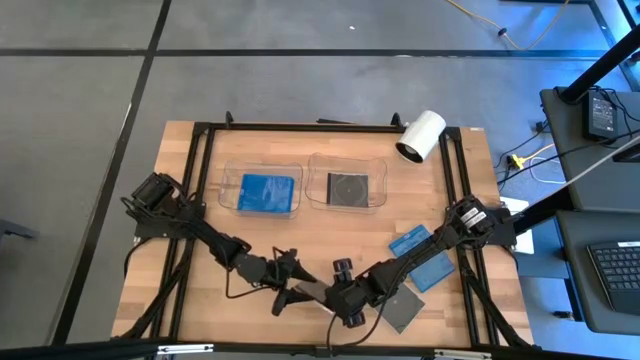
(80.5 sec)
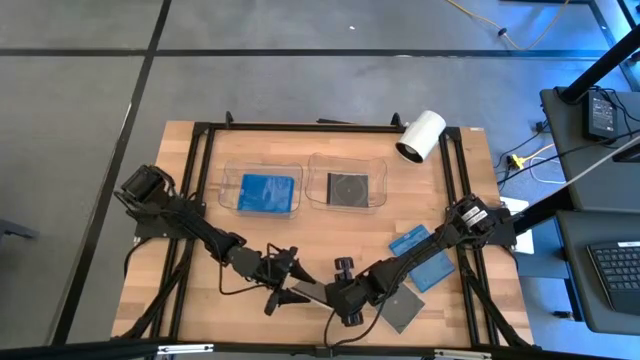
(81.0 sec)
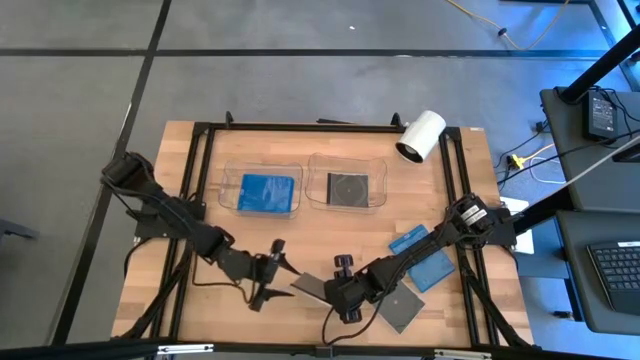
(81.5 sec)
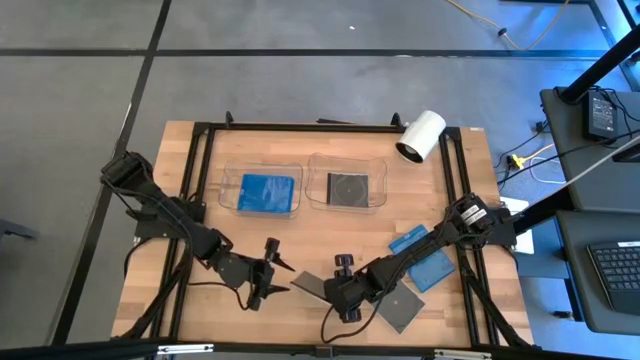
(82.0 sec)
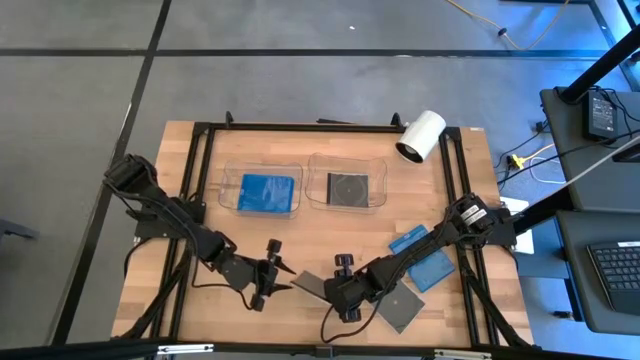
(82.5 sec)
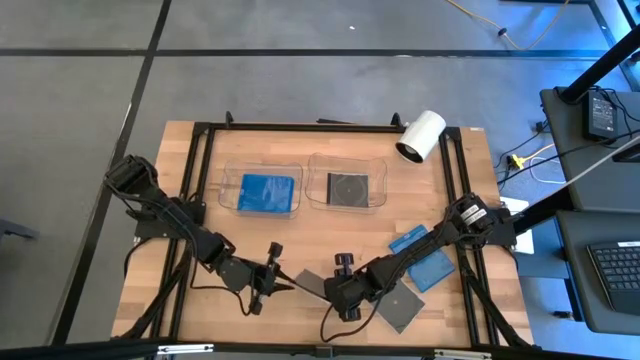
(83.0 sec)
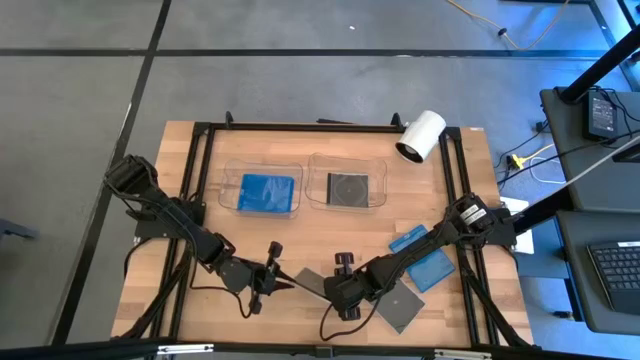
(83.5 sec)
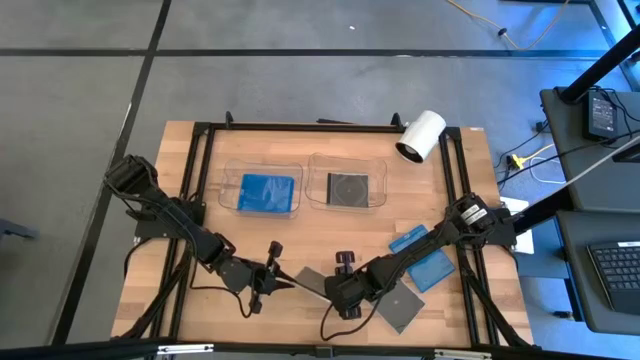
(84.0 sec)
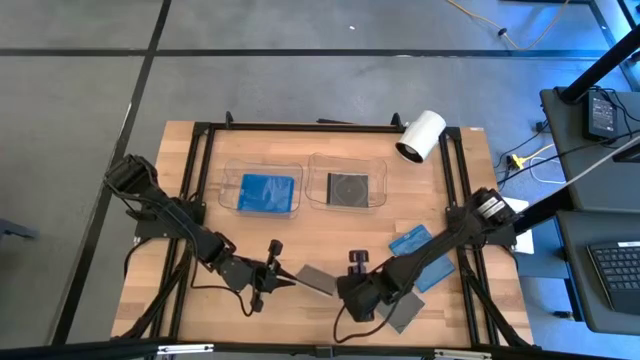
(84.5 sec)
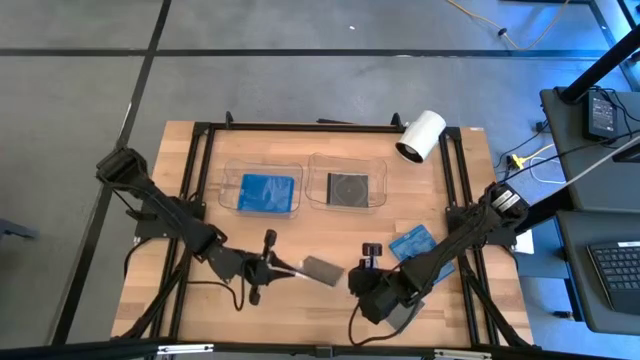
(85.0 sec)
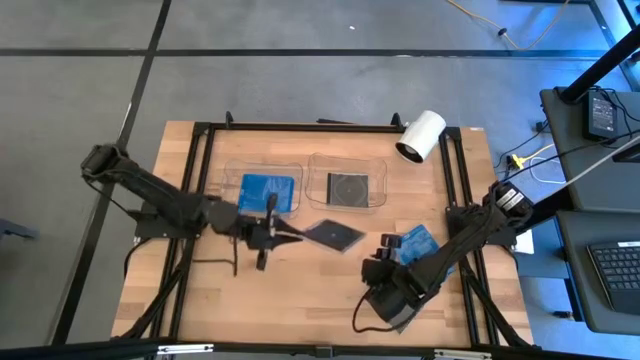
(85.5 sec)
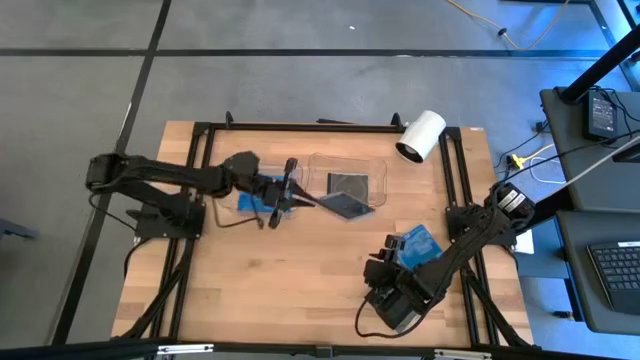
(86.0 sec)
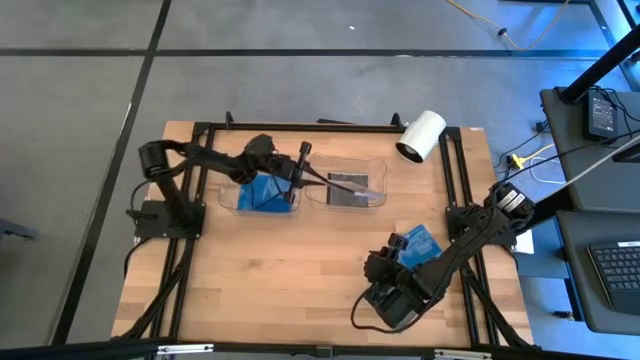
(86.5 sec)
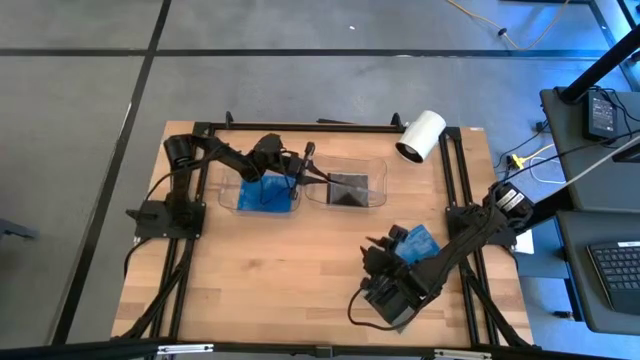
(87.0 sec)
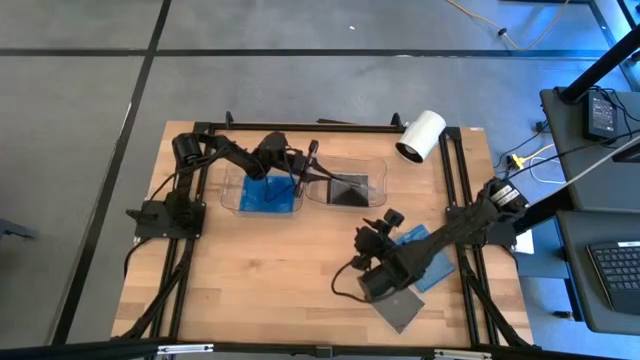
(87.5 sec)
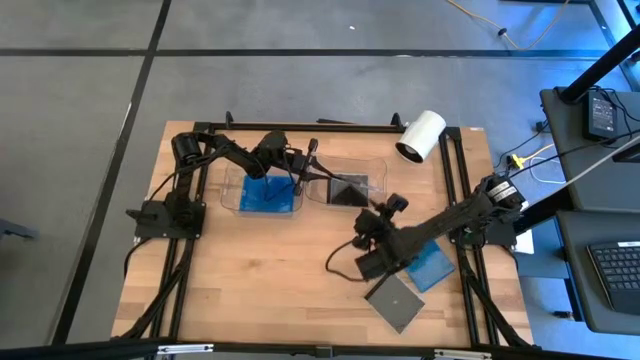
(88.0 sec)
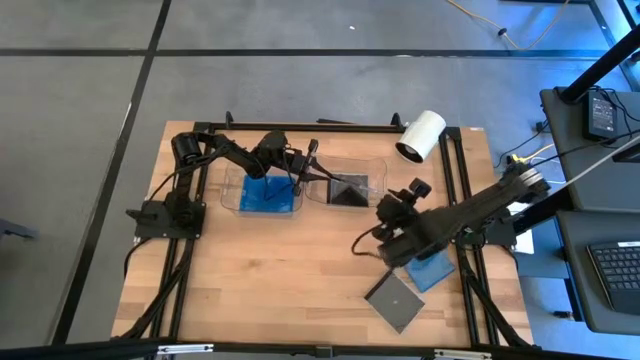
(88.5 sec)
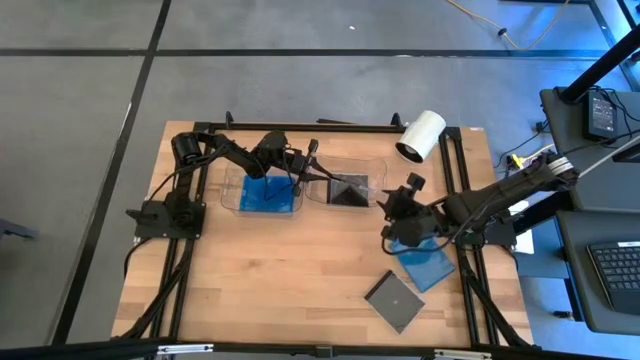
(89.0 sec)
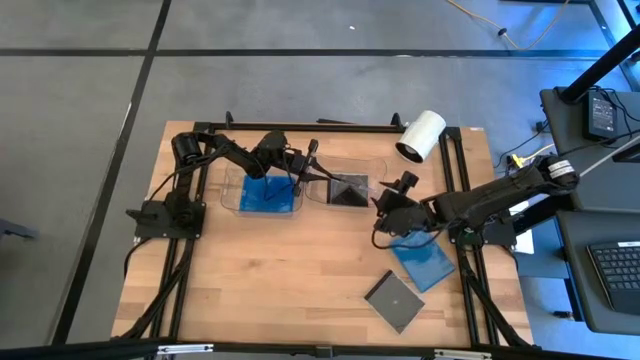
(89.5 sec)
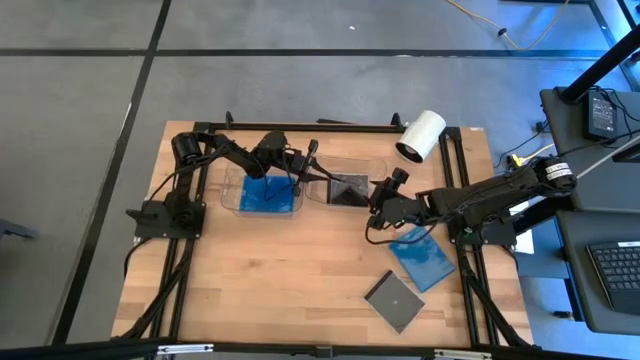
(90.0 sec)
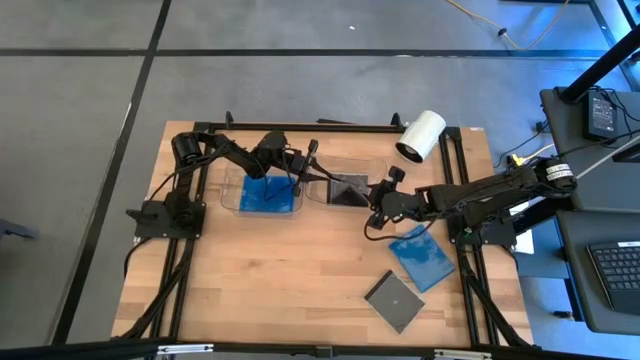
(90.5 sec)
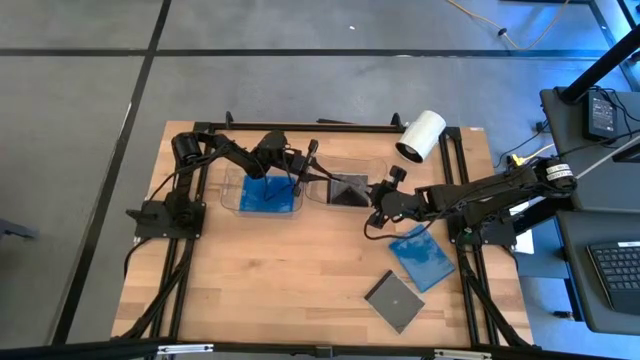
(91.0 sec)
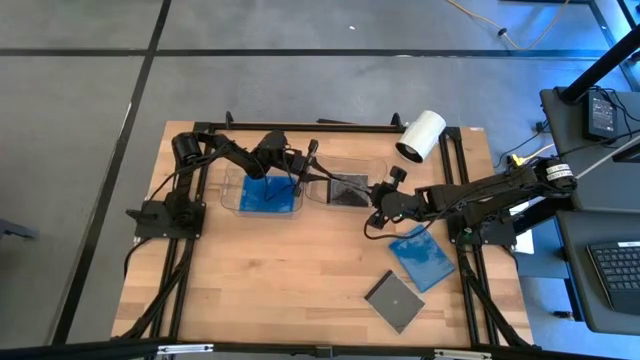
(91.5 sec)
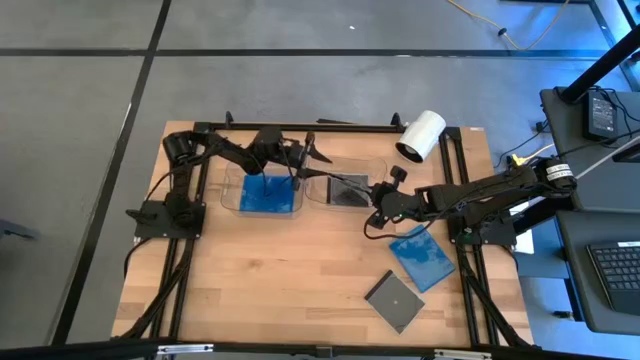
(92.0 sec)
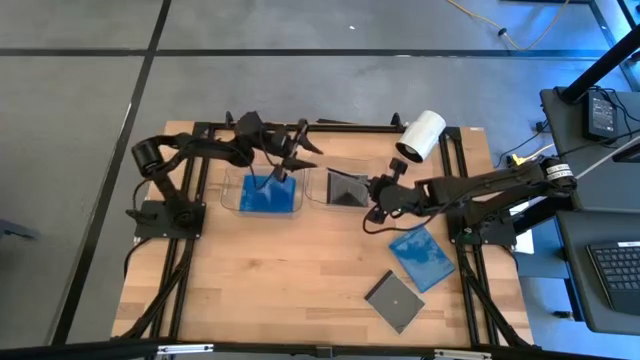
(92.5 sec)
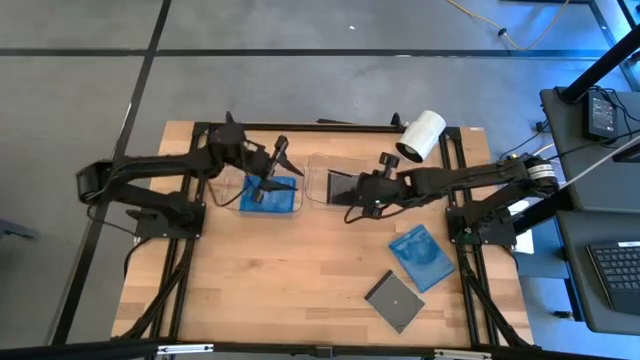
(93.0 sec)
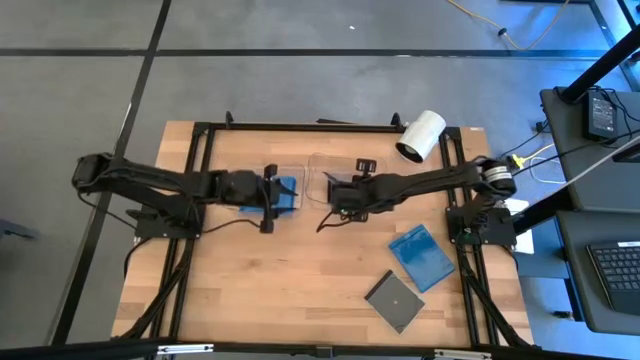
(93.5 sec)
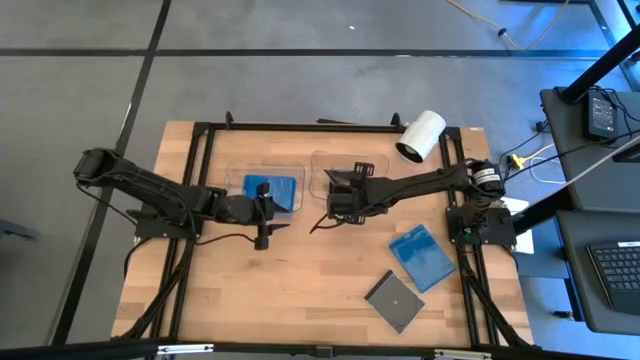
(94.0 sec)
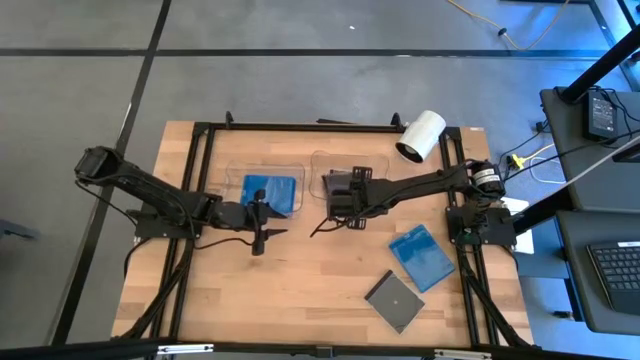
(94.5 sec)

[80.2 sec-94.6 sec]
Task: Pick & place jewel cases by type
Put the left black CD case into the right transparent bin

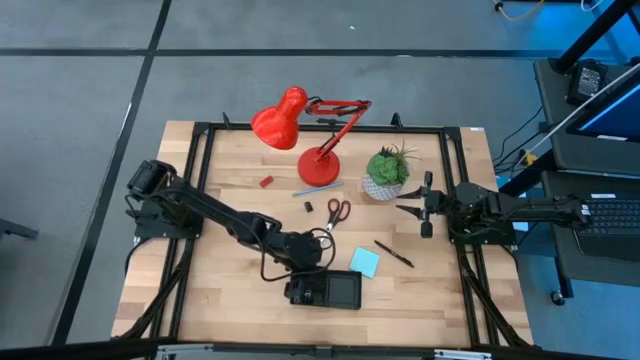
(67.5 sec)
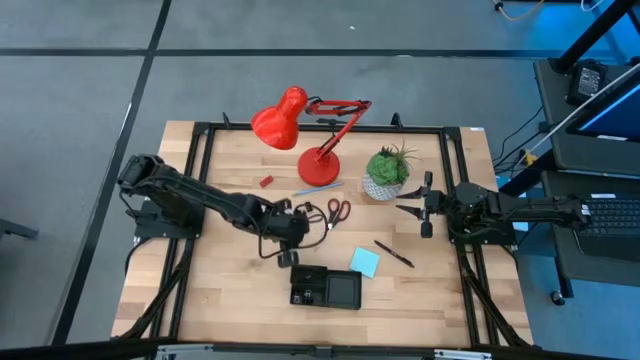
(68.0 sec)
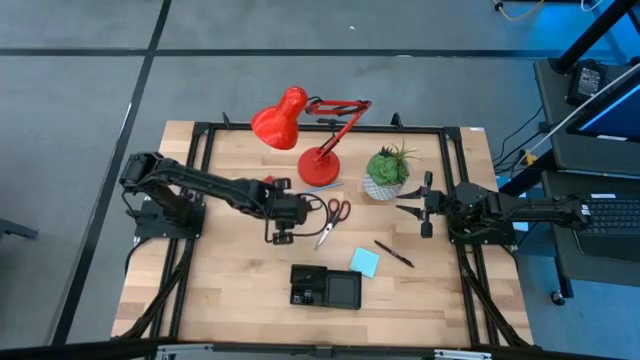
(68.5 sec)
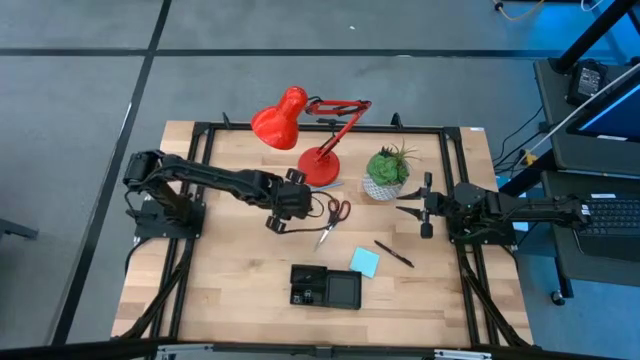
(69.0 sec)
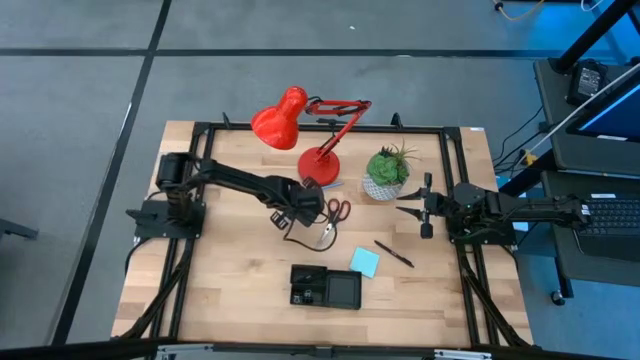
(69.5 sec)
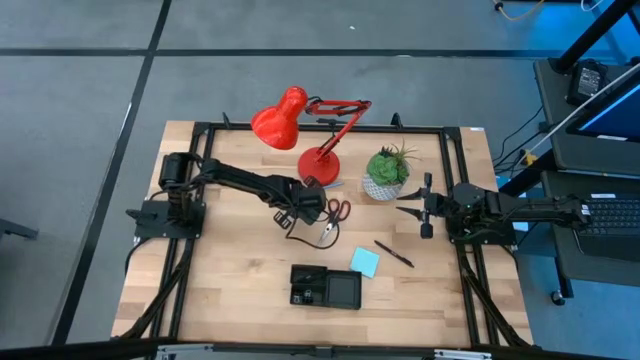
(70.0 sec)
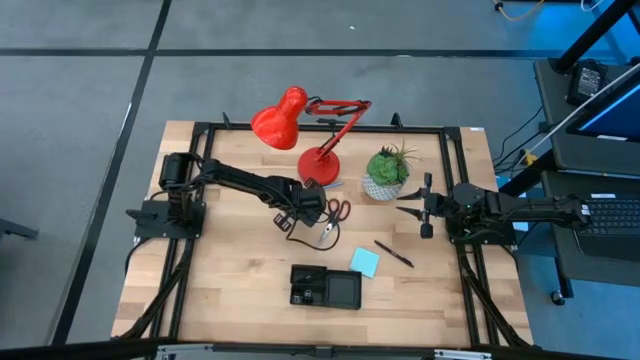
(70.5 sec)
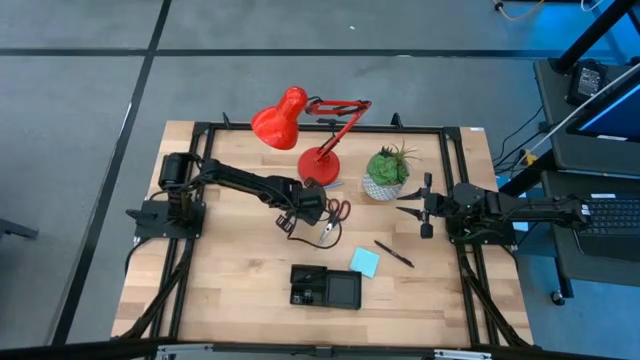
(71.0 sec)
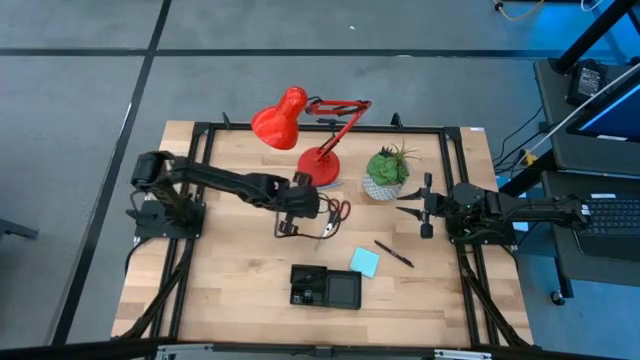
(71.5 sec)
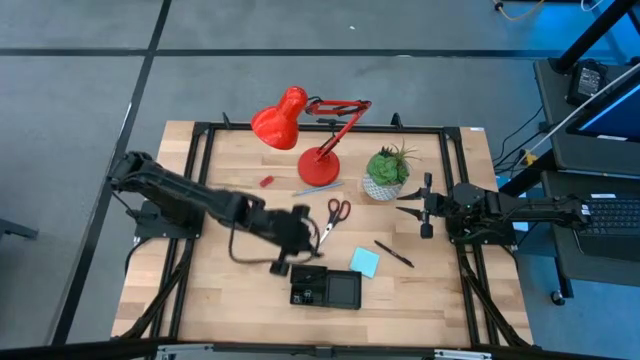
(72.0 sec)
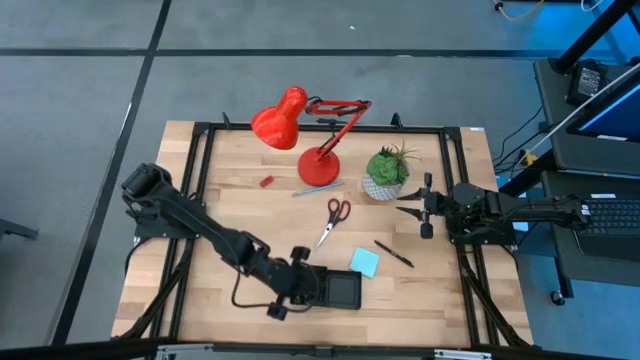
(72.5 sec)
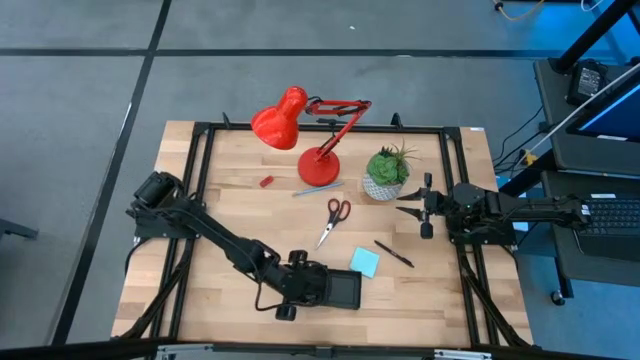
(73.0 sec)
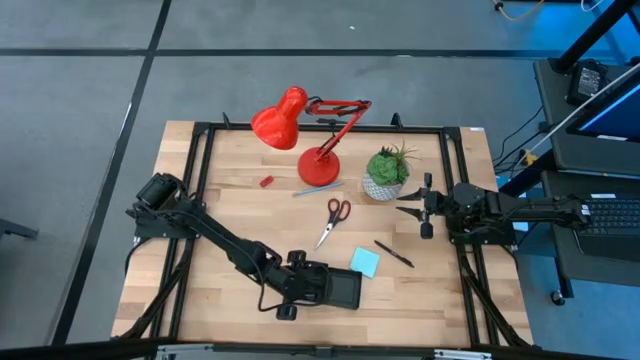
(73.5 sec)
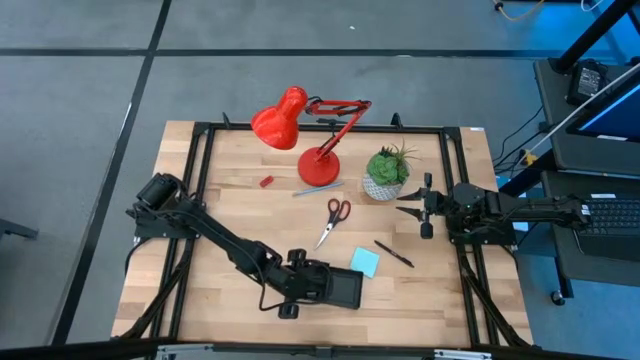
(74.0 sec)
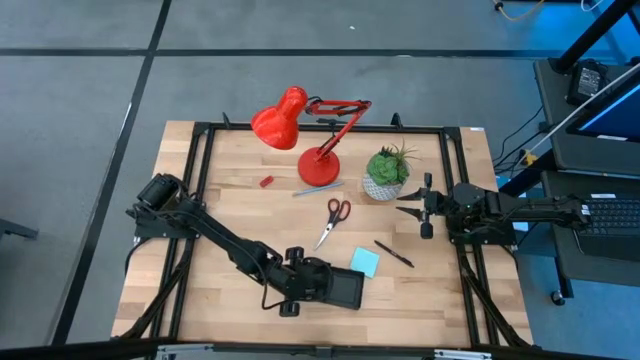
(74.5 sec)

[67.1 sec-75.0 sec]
Task: Pick and place office supplies into organizer
Put the black binder clip into the black desk organizer
